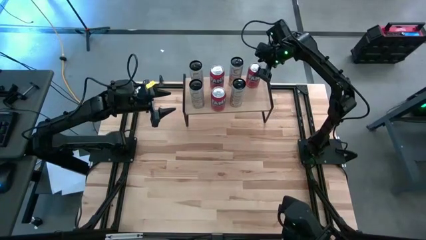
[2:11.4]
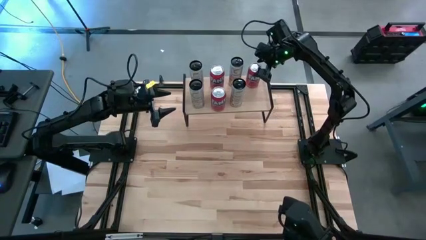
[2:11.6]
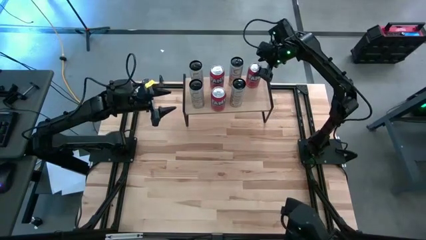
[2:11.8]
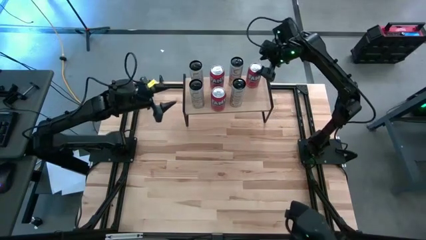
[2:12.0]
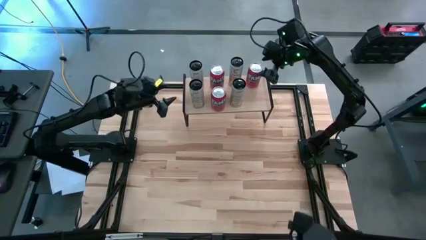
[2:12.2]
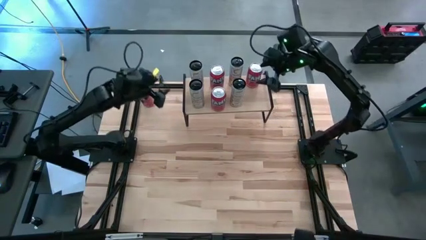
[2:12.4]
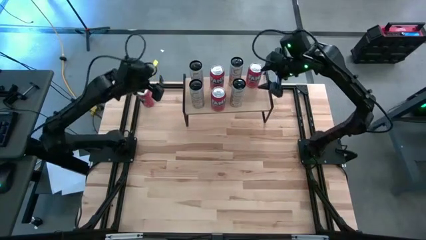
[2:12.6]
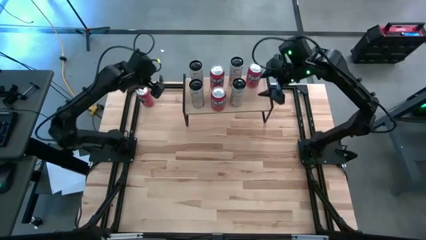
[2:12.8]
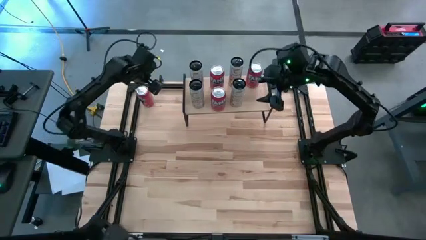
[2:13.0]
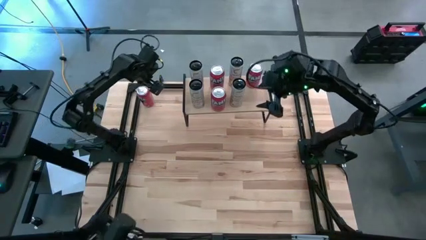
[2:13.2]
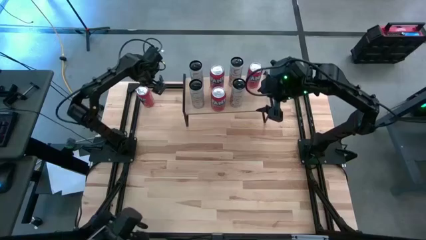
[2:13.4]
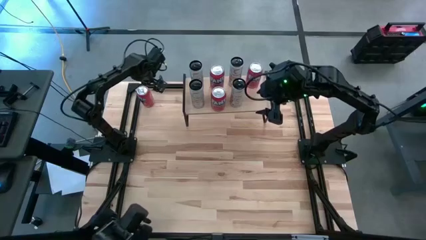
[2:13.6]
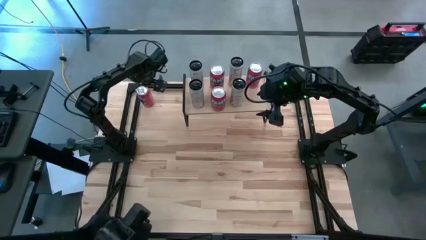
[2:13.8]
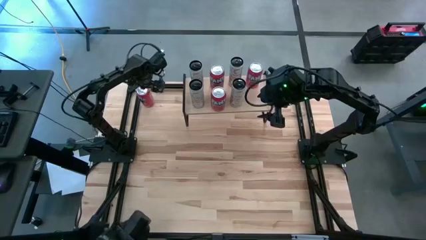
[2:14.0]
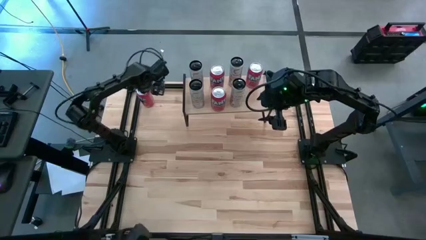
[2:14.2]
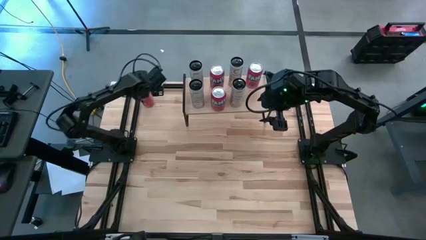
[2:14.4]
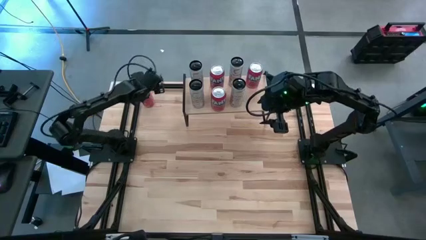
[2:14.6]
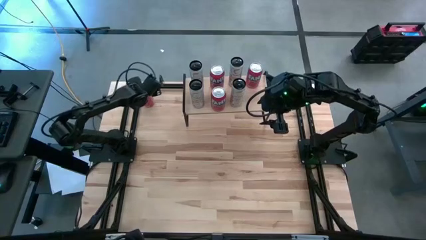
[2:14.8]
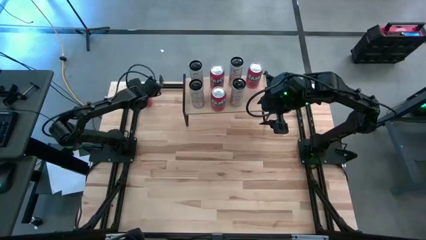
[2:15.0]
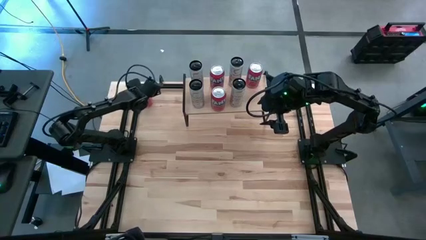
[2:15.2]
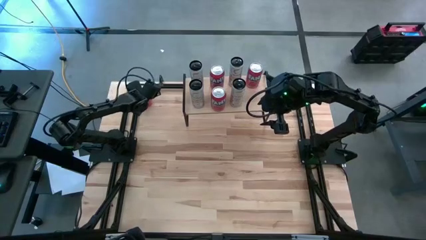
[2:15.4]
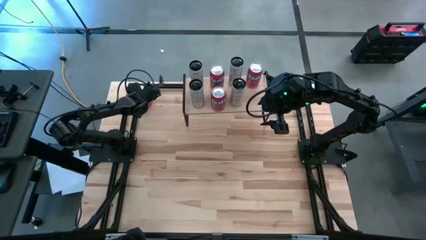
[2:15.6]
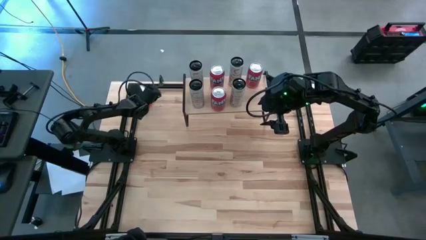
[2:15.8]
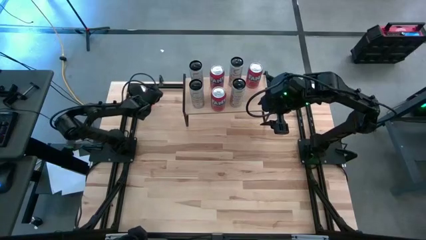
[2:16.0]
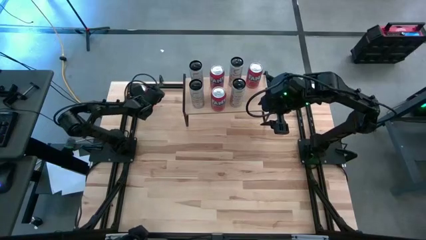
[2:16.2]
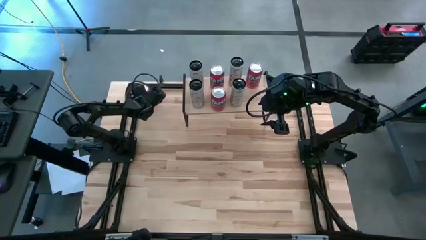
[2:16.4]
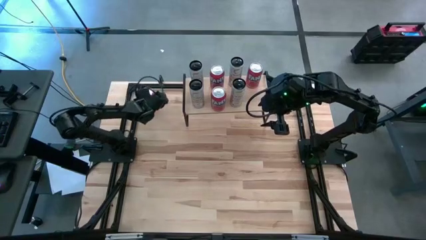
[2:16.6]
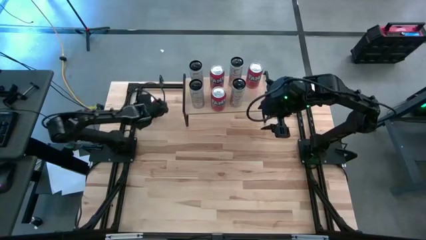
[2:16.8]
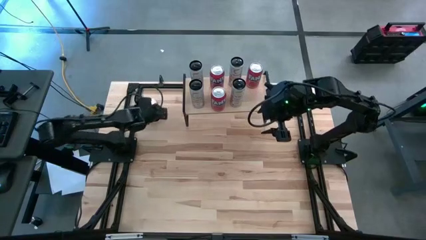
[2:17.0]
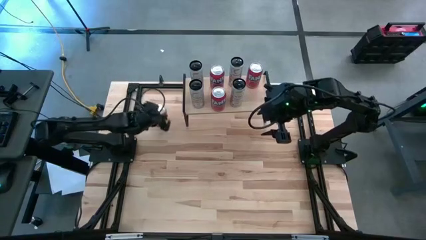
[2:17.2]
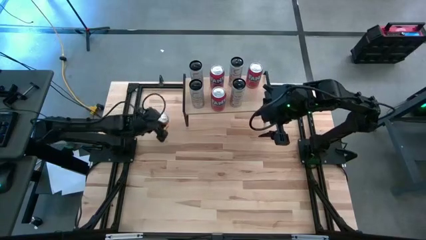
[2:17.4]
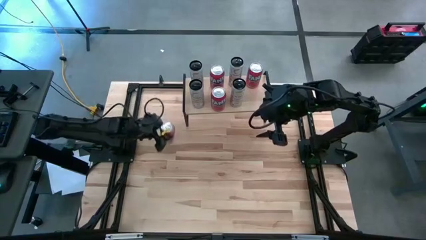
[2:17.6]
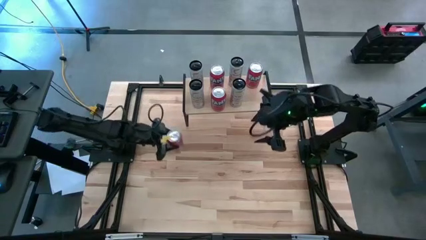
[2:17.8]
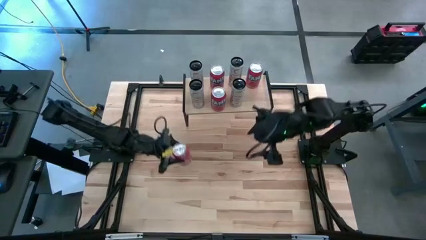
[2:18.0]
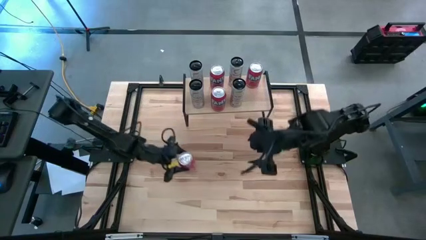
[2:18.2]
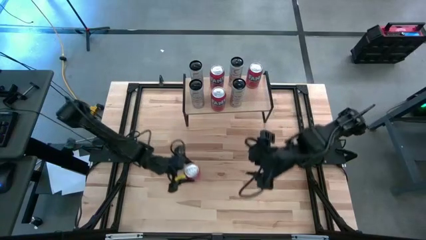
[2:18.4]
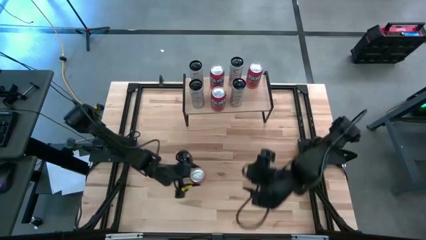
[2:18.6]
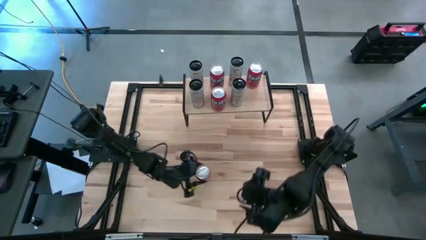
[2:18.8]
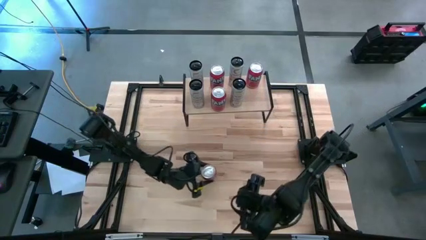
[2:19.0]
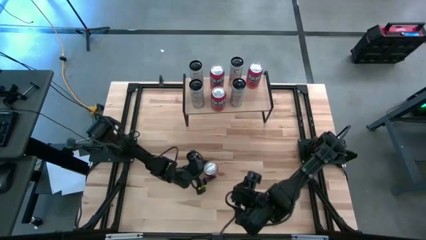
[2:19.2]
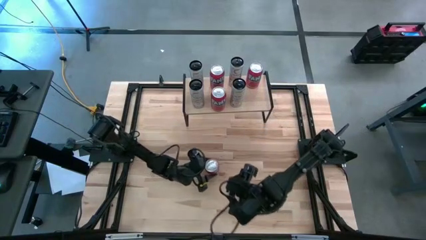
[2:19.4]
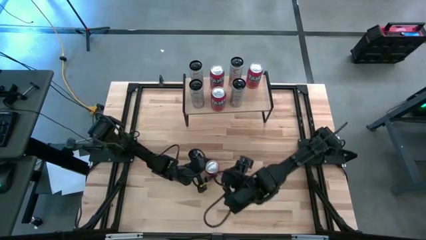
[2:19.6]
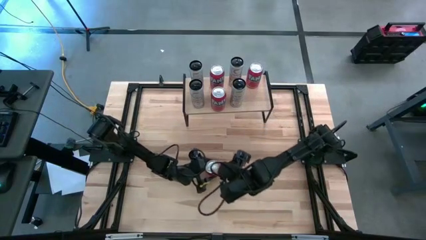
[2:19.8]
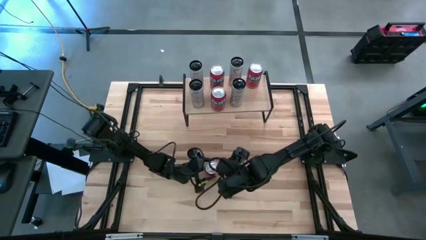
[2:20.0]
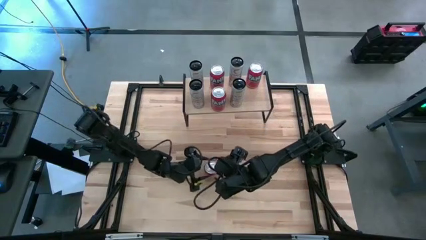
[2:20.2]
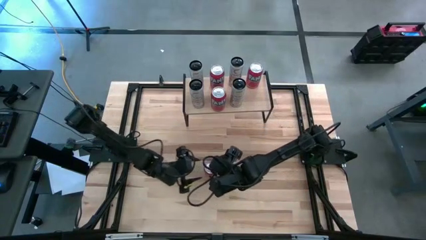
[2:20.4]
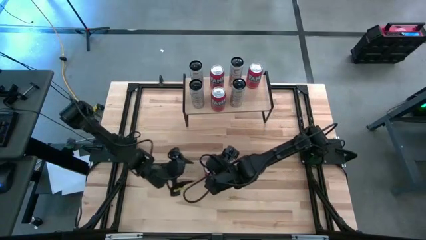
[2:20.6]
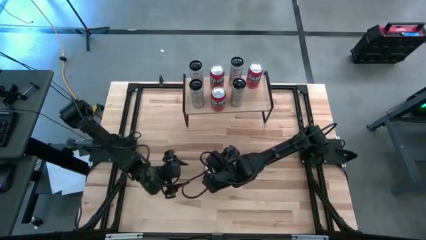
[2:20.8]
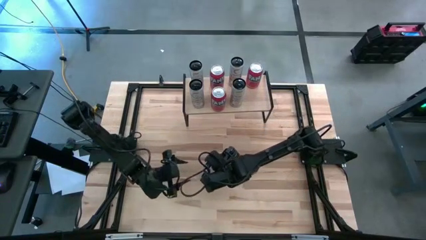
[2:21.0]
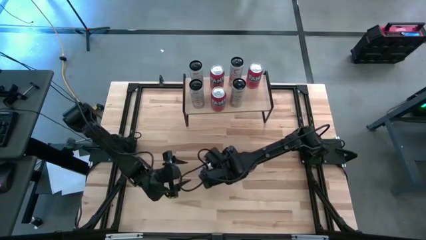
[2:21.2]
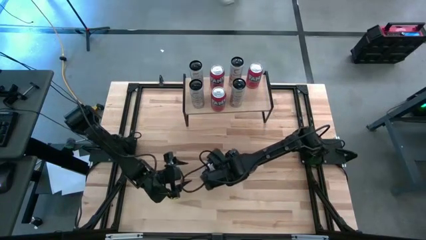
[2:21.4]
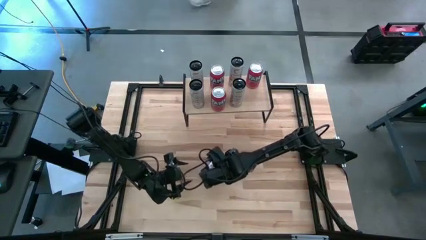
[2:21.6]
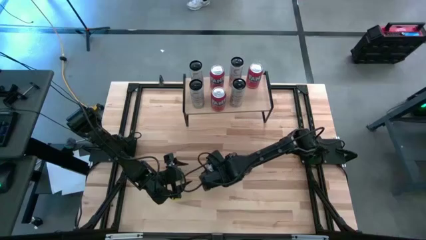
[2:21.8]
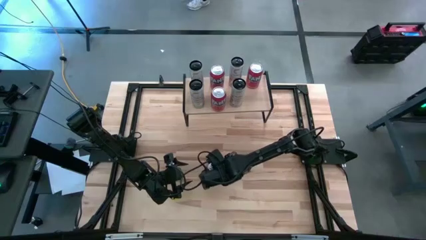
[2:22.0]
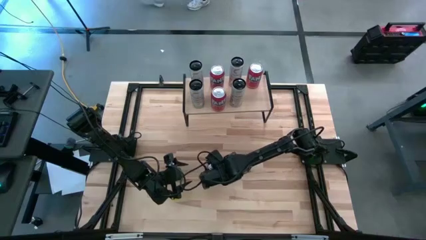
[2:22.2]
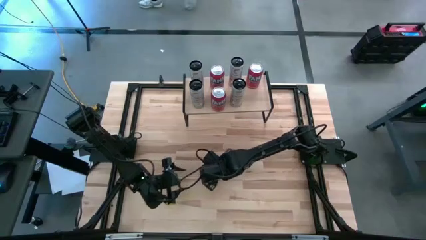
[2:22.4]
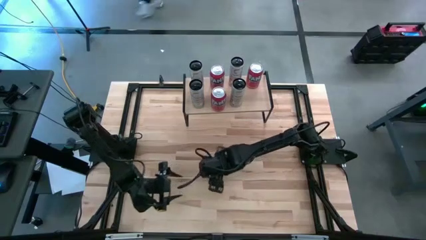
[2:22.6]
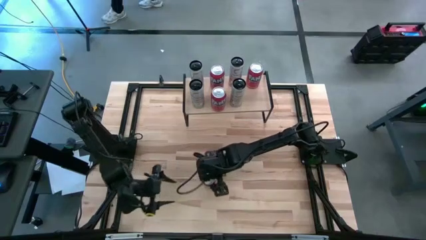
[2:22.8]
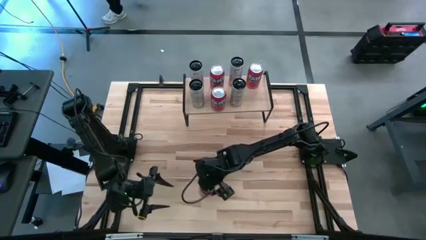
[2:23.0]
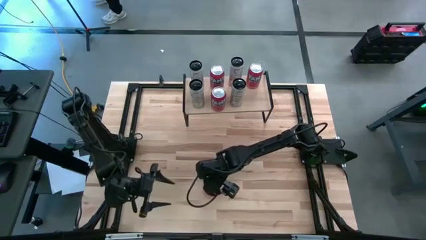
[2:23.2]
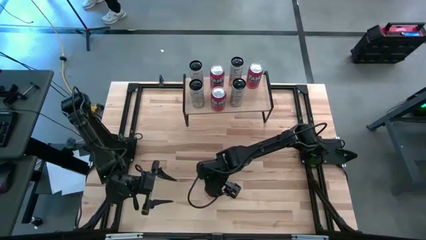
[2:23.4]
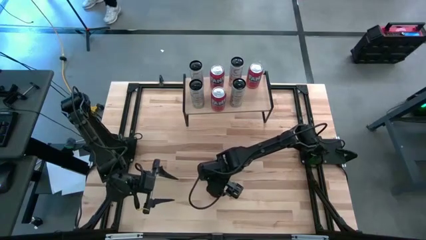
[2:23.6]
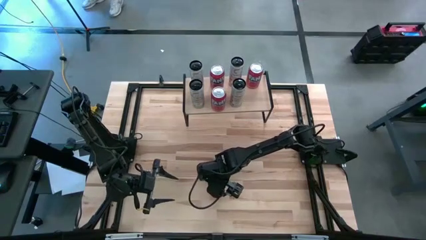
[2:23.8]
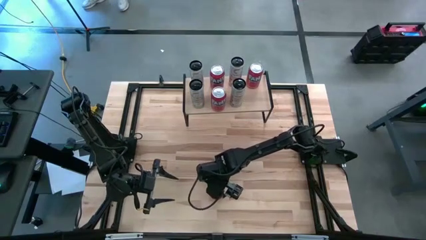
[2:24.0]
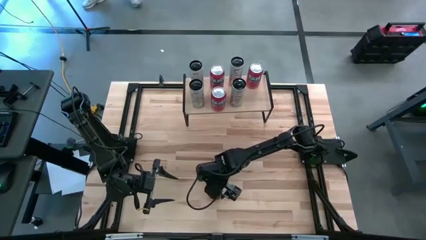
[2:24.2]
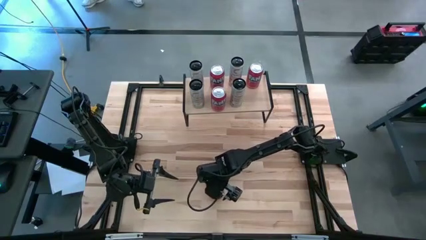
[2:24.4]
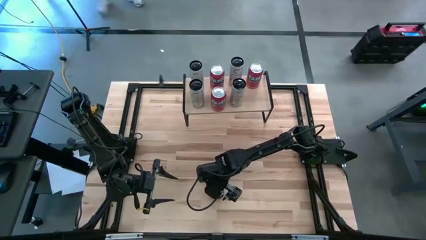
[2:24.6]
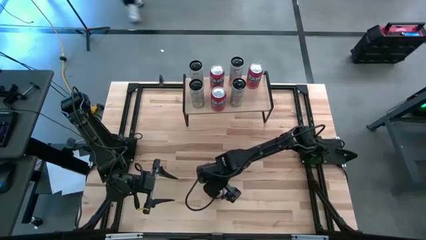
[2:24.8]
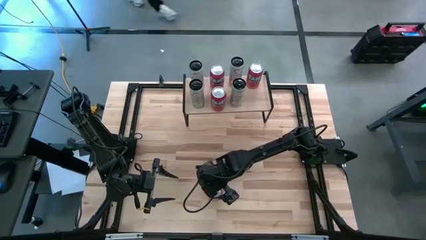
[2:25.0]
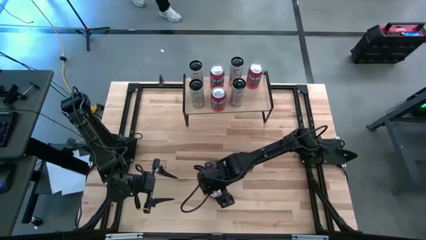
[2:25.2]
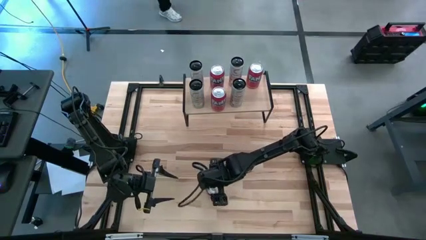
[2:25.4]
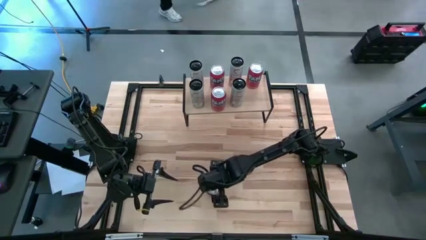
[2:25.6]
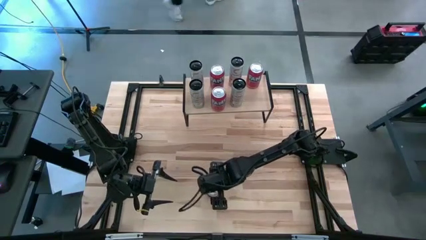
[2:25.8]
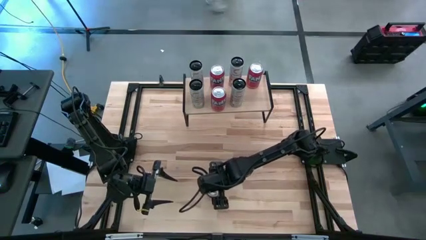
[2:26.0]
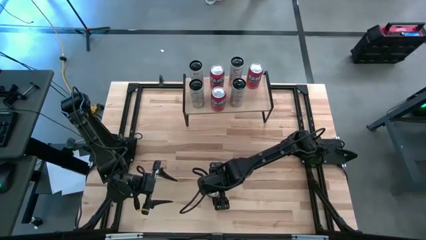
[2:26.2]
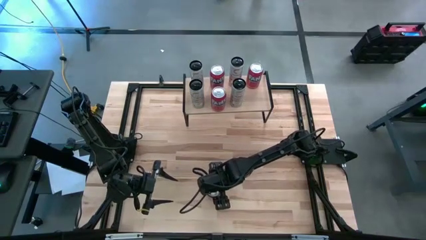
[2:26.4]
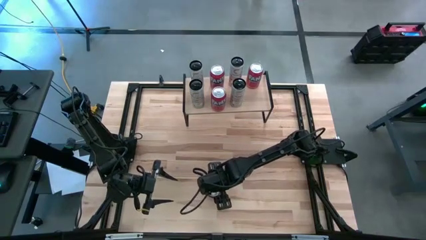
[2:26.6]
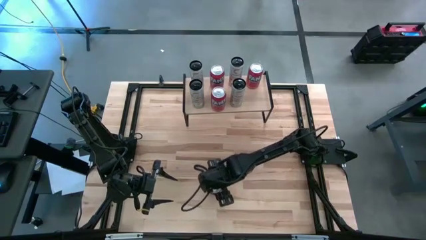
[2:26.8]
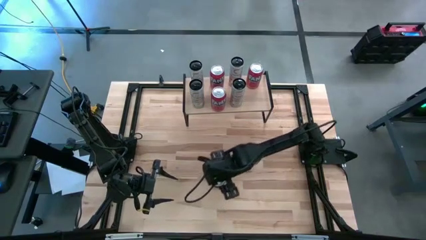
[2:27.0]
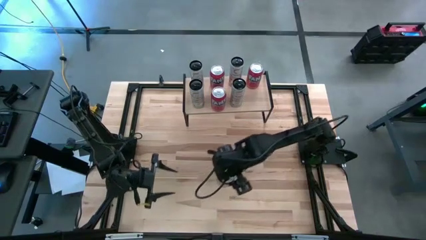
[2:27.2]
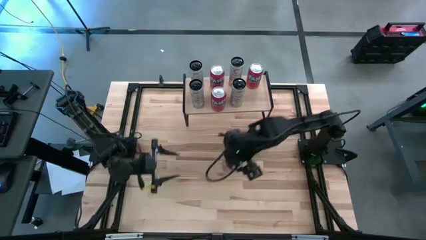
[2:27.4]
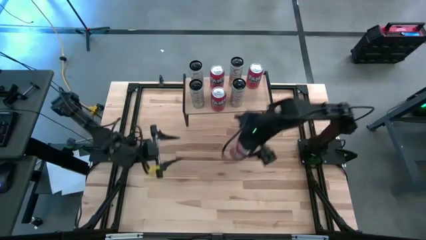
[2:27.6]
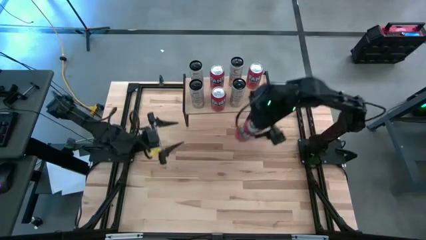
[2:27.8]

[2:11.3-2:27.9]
Task: Place canned beverage on shelf
Put the red soda can on the shelf aligned with the other red soda can
